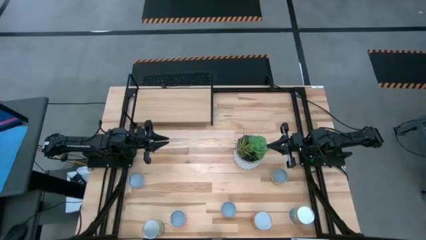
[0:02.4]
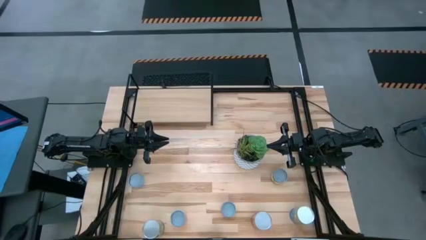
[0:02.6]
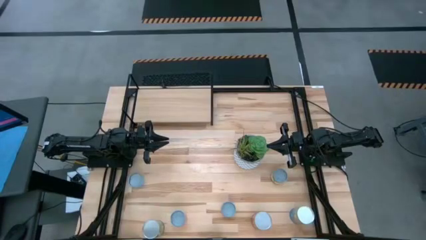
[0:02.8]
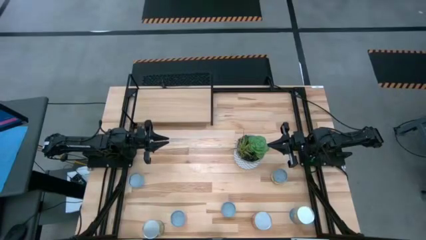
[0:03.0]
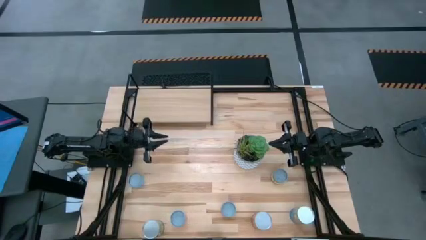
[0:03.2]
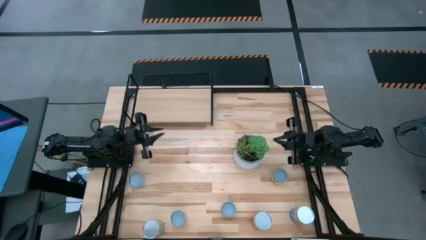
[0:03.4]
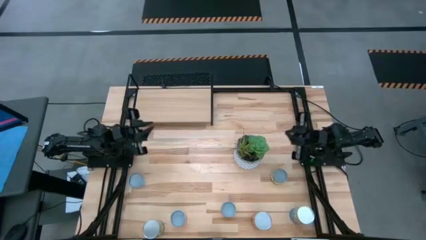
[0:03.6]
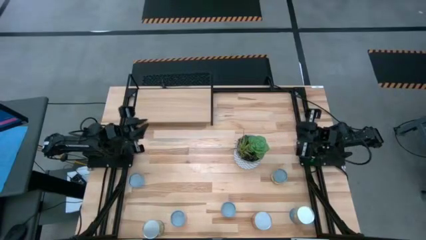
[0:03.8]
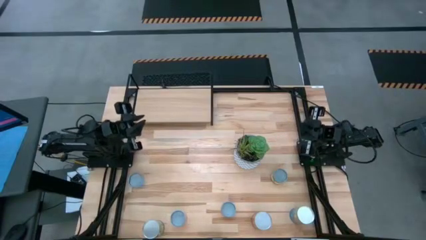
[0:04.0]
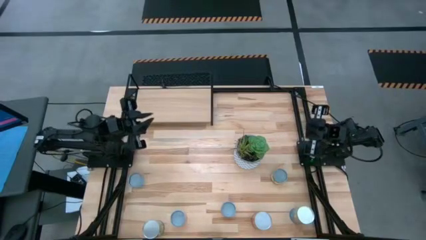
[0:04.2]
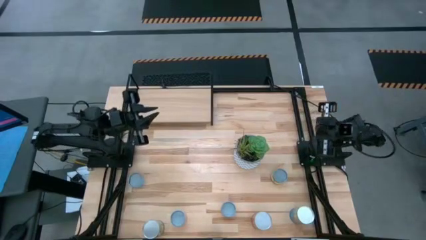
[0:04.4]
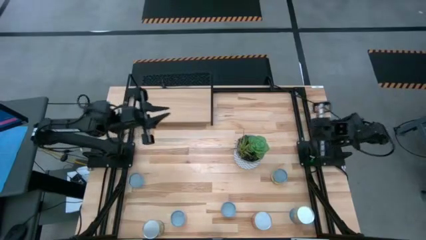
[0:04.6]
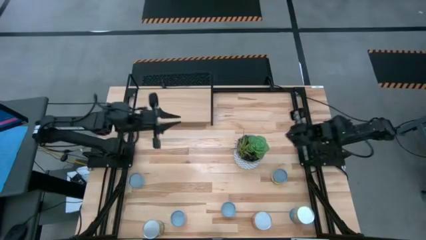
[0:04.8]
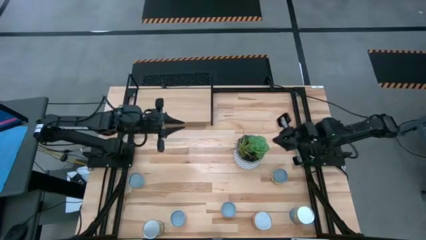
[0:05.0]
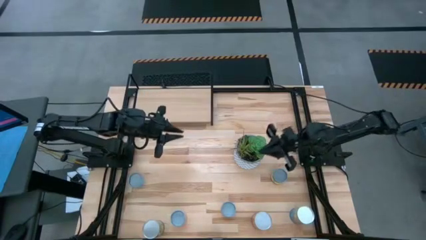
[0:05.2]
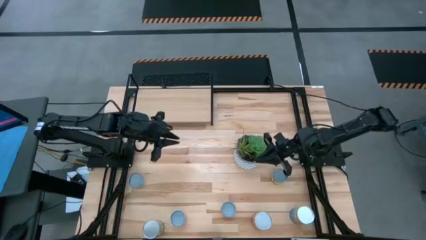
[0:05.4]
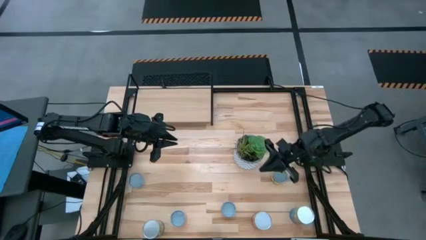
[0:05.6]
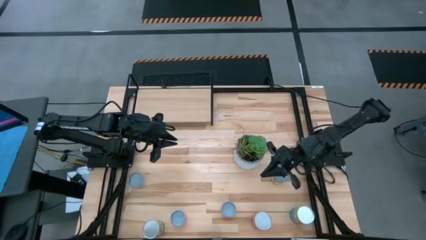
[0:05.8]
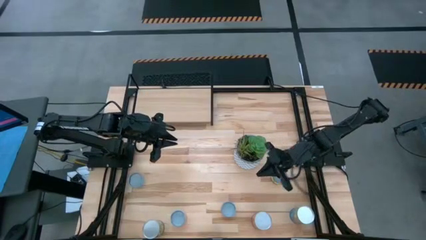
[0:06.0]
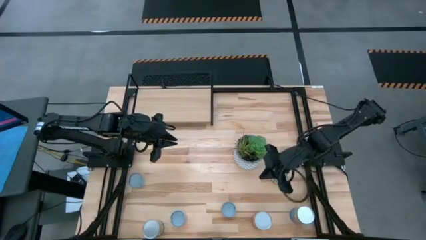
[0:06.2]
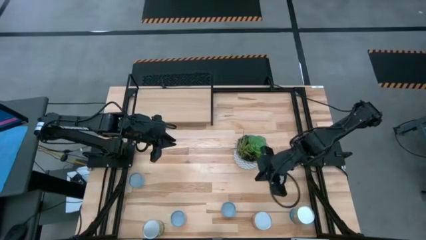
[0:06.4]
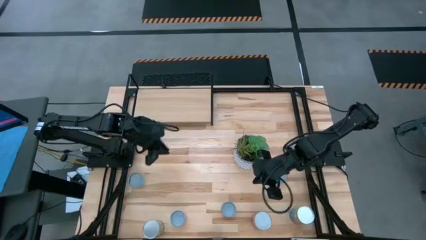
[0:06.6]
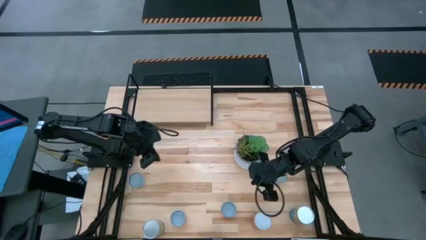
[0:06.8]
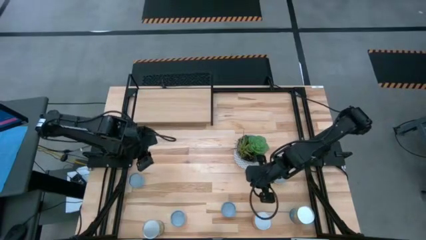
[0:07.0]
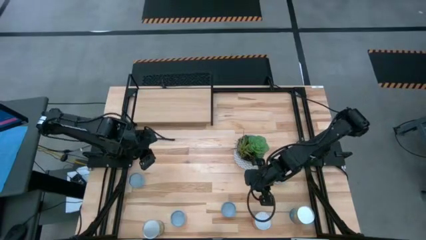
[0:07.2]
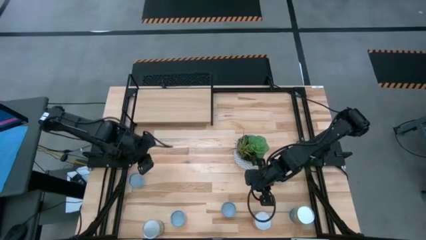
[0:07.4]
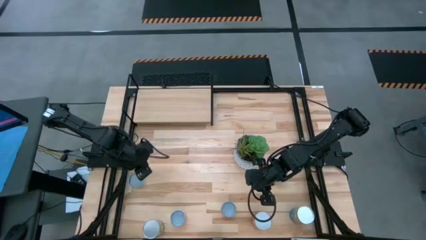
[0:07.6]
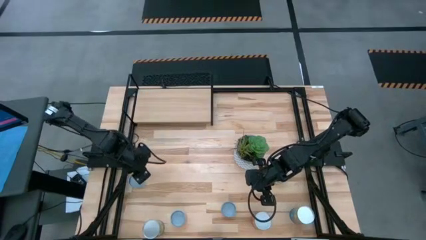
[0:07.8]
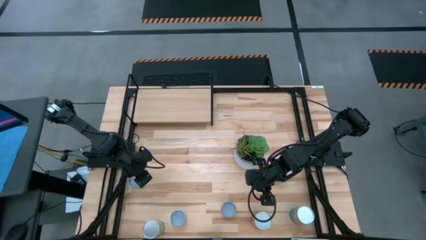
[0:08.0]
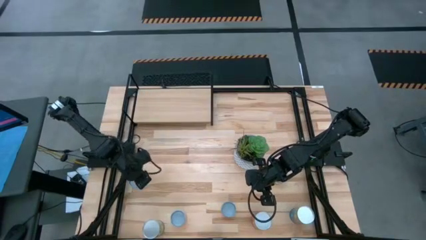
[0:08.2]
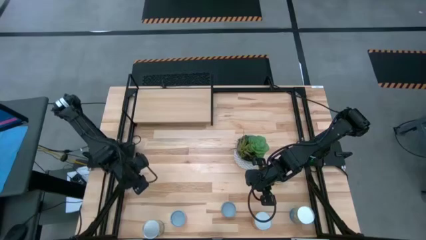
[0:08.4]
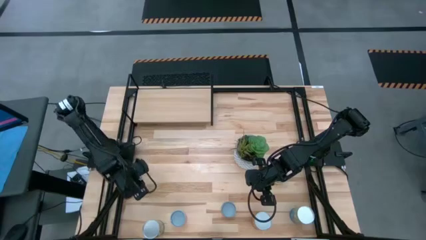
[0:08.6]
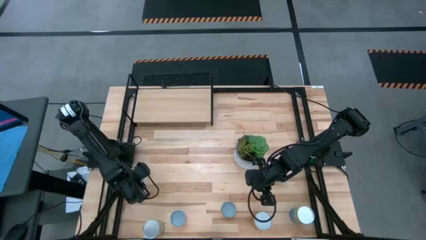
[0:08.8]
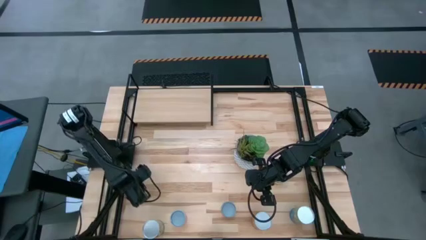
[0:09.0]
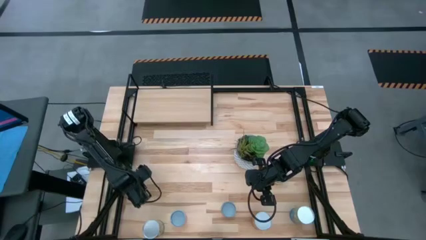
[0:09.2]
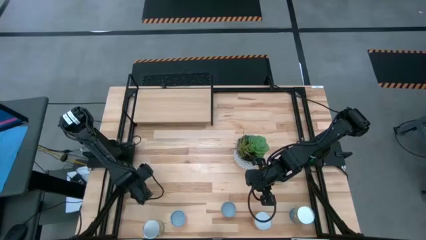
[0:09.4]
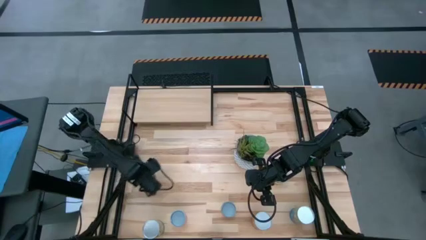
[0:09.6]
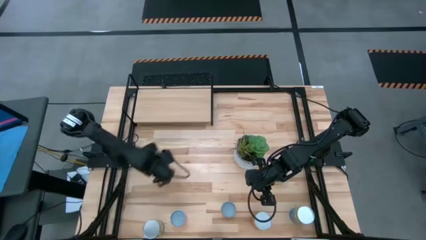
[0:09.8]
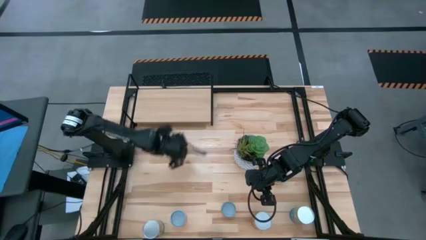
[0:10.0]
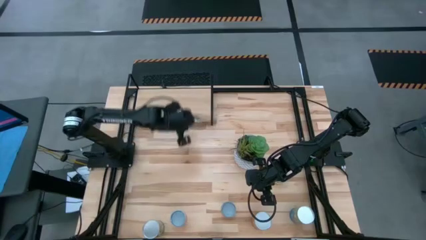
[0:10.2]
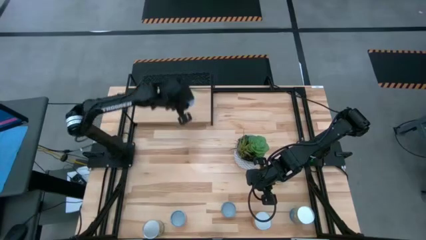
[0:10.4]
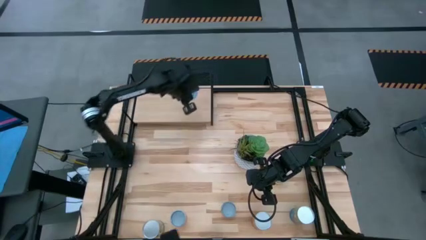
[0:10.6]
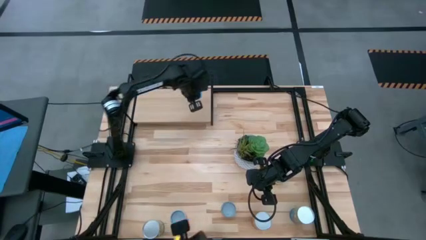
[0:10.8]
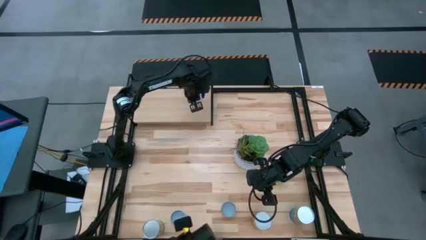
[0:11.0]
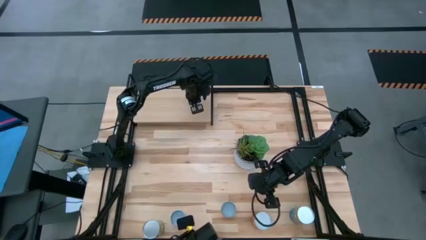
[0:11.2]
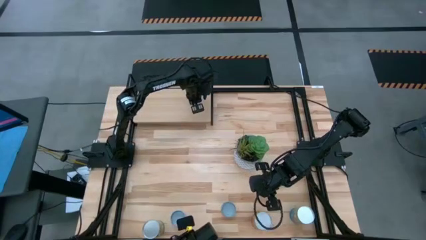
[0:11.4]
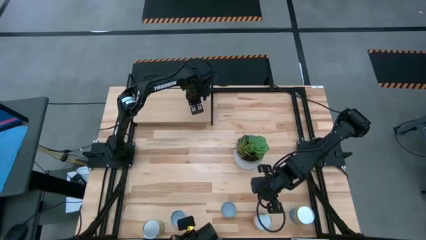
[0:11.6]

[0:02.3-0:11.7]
Task: Pick and place cans onto a shelf
Put the blue canned good on the shelf

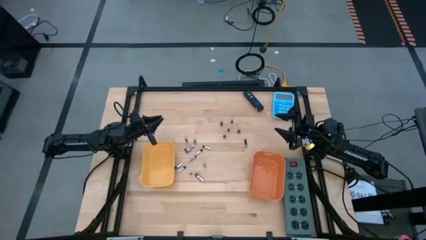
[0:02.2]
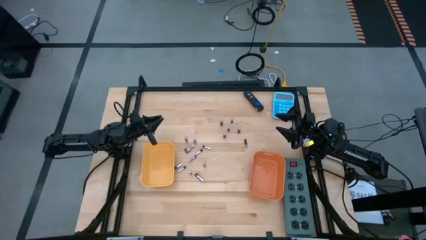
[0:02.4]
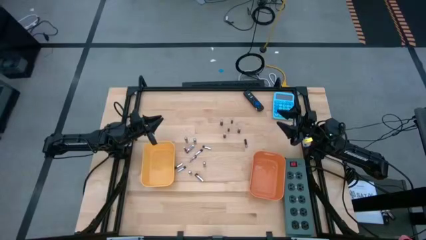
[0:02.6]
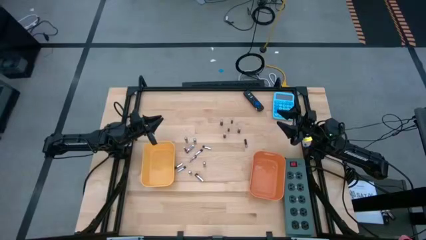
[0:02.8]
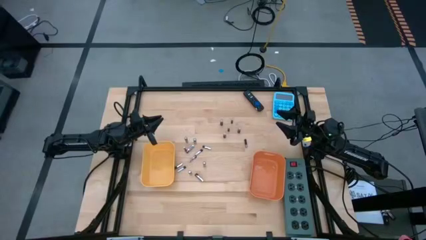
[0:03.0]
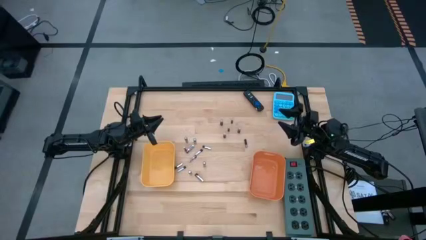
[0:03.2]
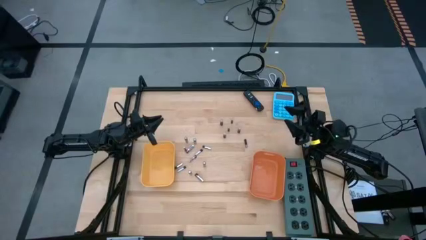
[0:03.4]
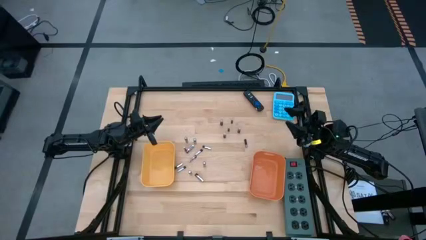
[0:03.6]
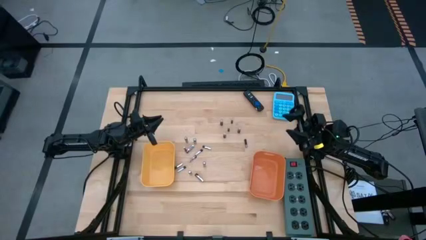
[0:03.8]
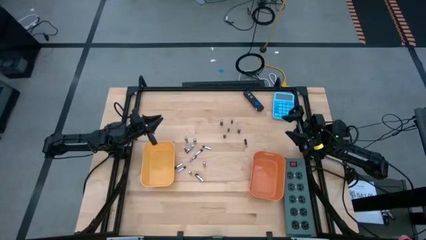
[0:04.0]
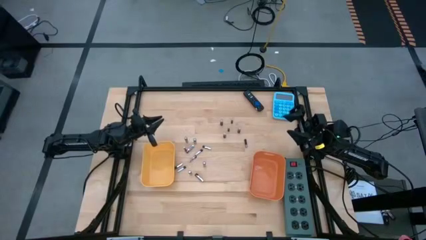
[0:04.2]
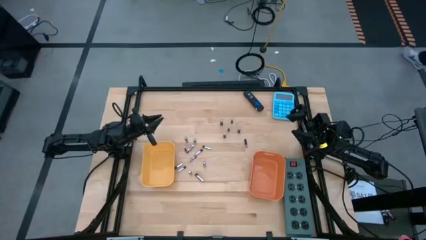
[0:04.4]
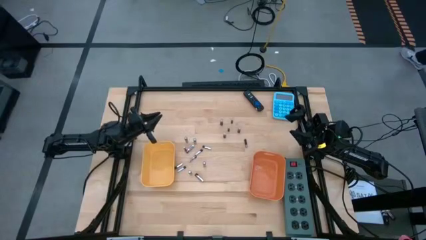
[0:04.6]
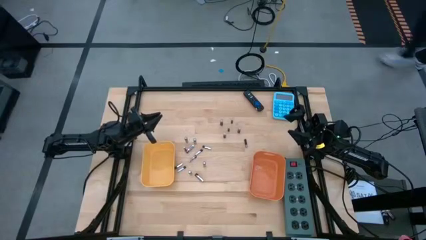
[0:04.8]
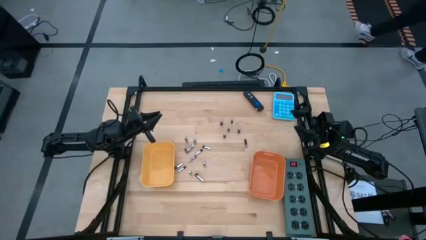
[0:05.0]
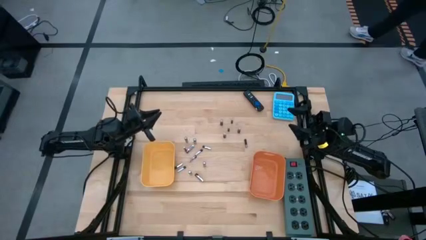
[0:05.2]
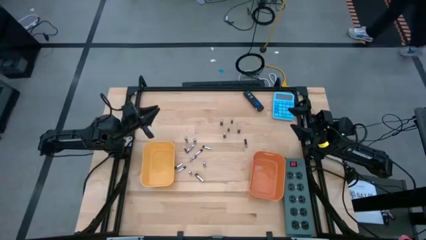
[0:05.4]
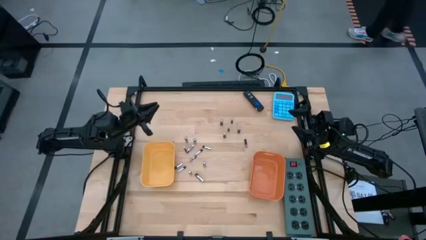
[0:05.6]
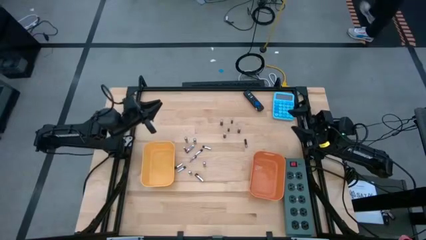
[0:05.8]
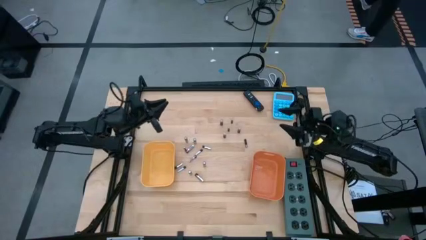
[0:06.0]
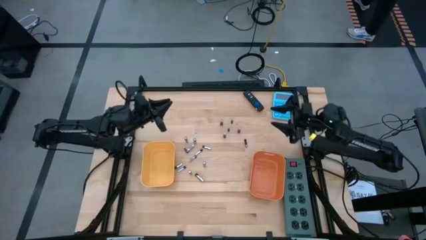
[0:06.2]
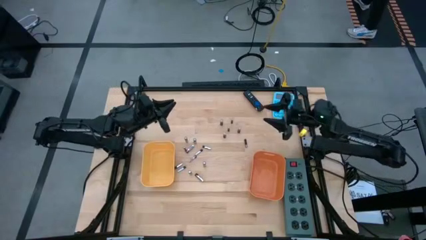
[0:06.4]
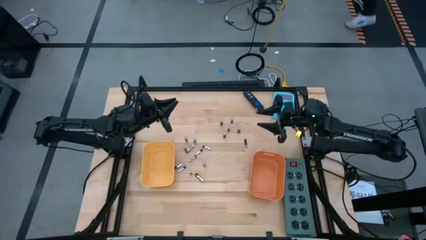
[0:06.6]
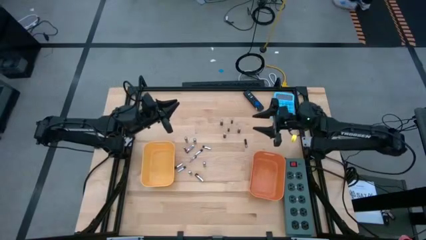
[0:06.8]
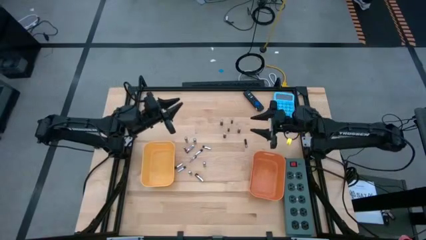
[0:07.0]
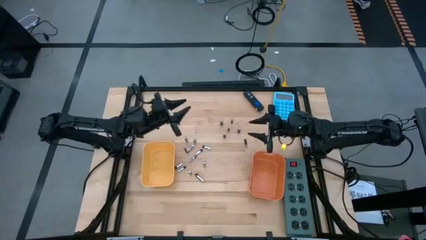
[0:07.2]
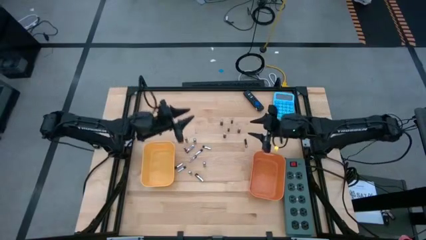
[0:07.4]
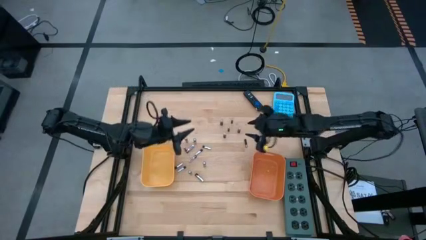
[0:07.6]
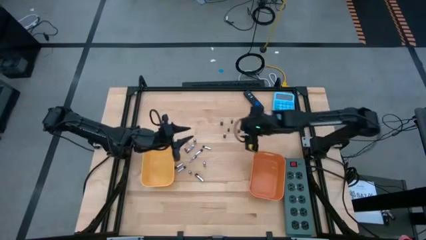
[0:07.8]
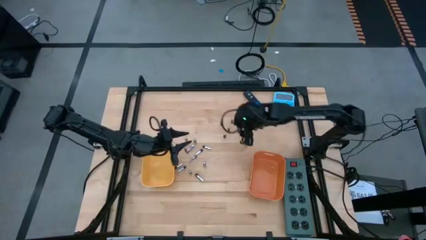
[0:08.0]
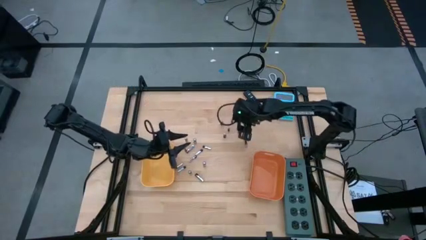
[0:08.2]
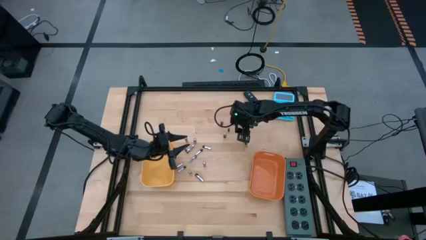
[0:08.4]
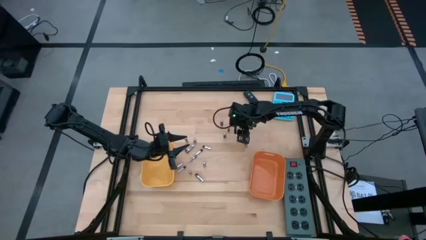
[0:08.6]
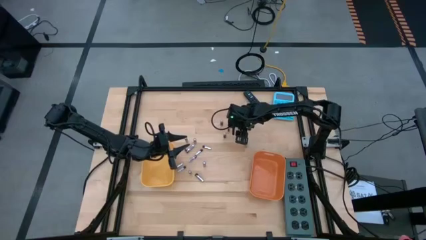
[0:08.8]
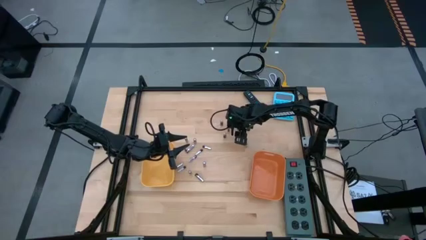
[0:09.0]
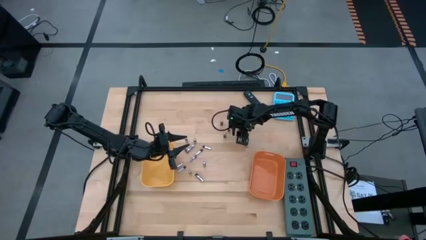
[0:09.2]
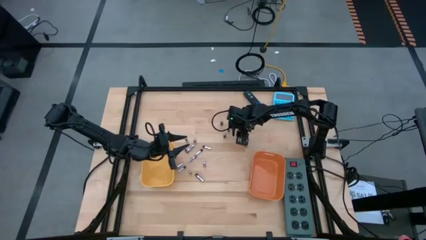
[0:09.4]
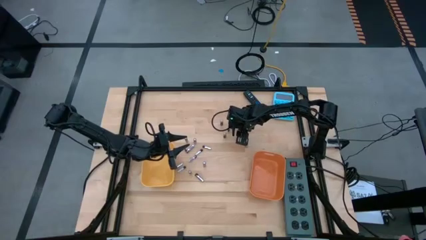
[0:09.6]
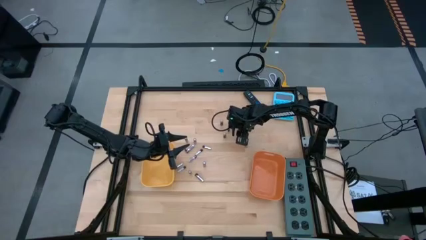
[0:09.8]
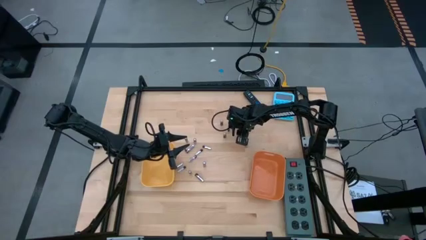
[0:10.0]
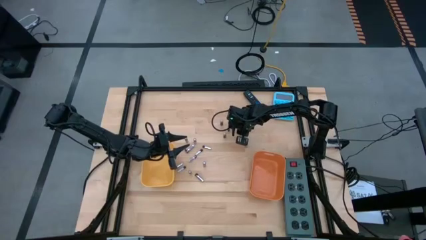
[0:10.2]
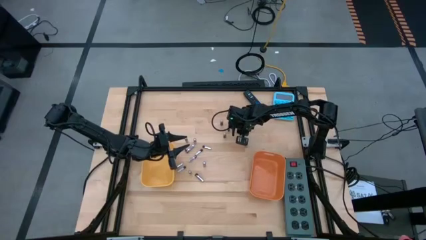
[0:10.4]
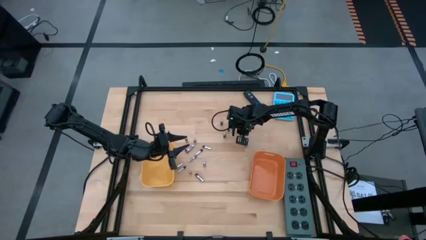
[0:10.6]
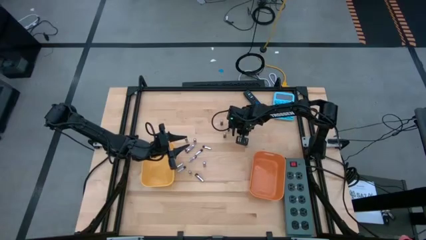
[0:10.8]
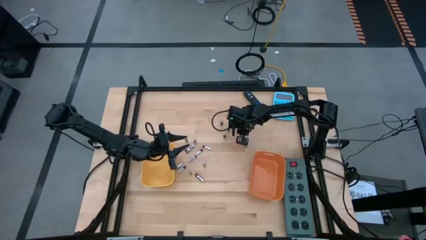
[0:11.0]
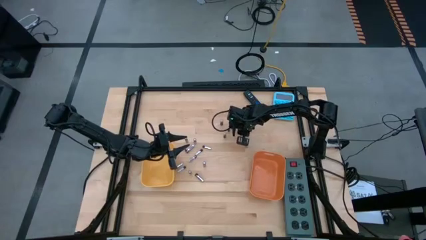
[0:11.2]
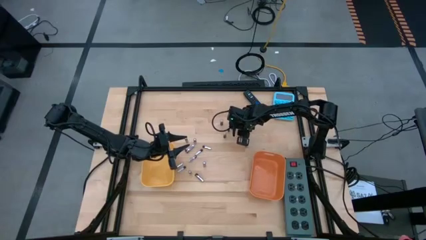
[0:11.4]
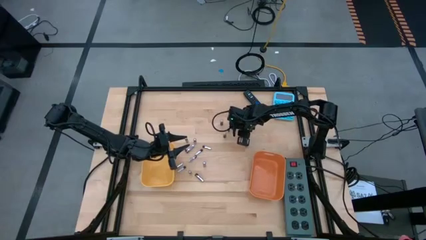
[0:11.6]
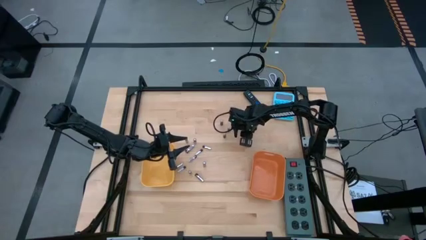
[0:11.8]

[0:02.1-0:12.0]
Task: Sort batteries
Put the black battery into the orange bin
